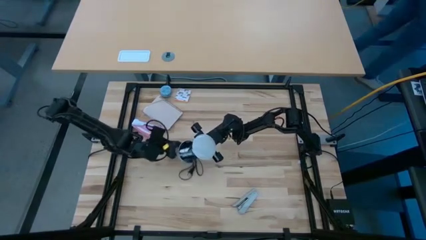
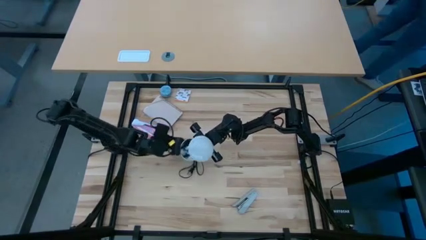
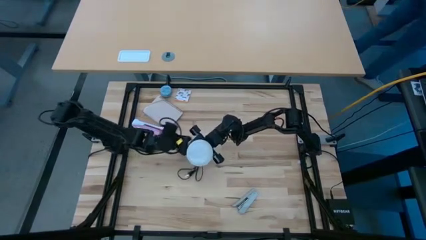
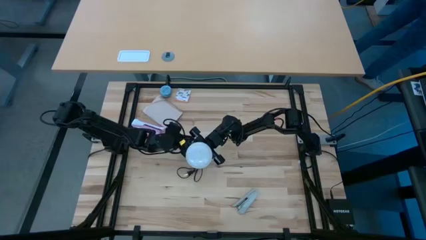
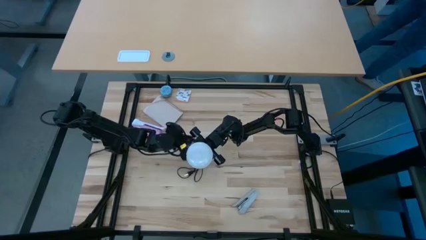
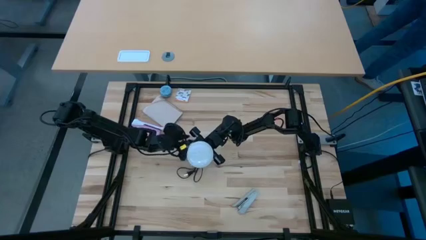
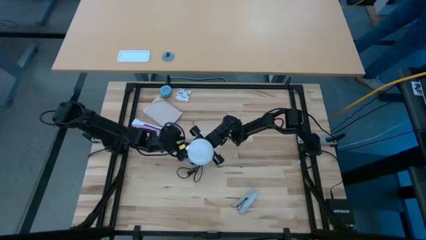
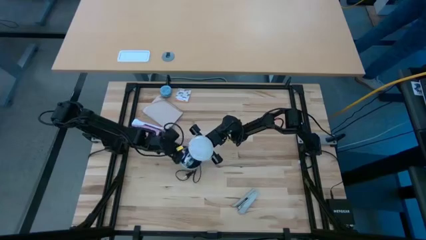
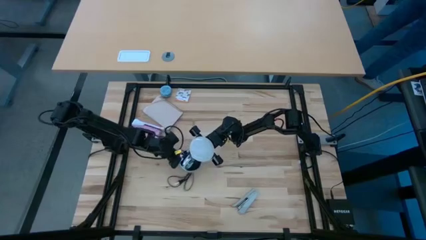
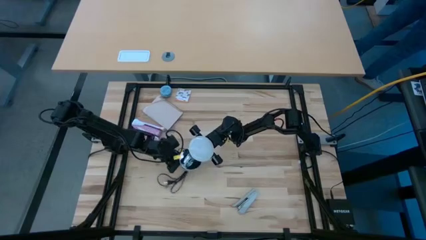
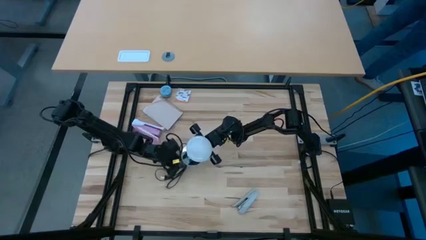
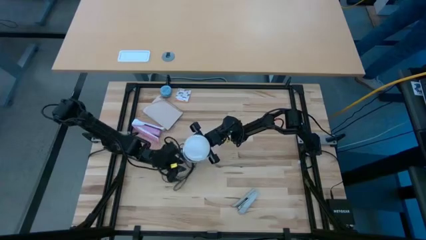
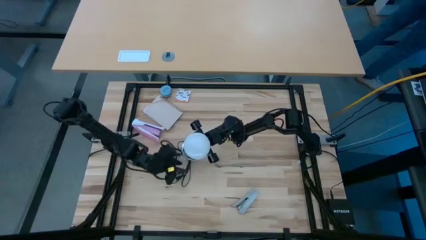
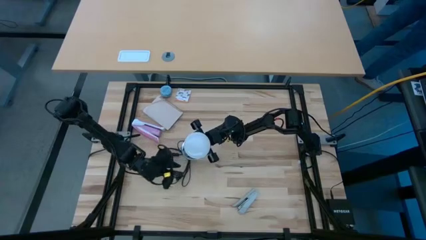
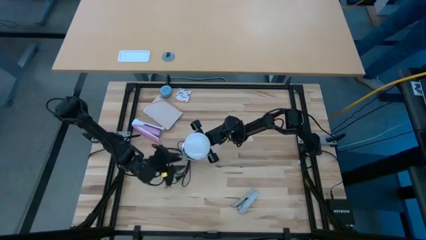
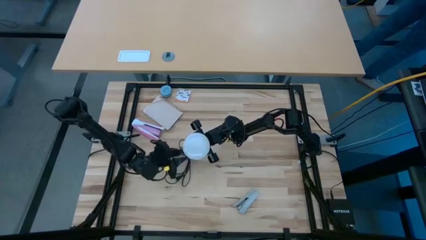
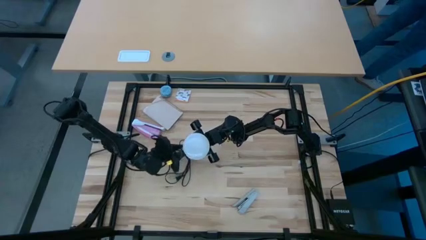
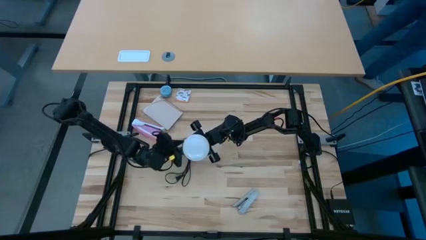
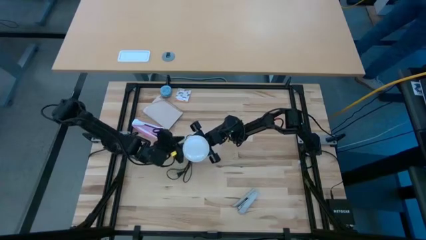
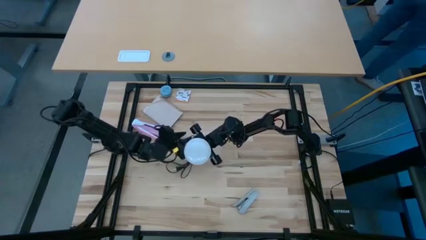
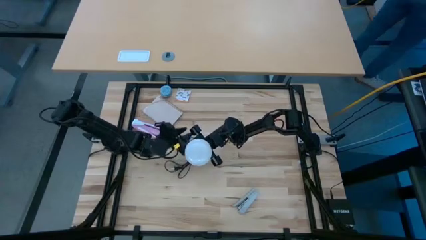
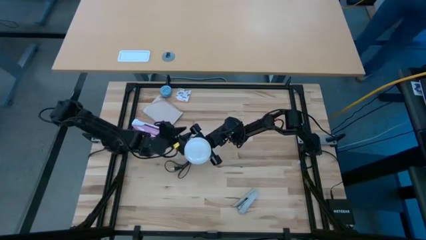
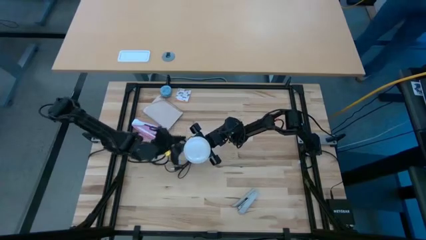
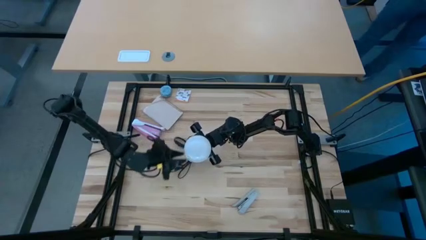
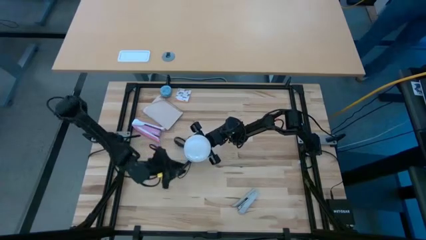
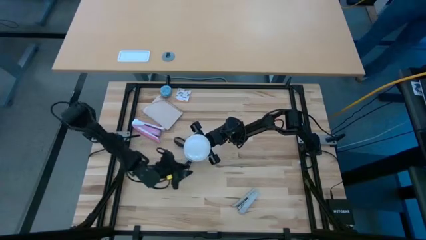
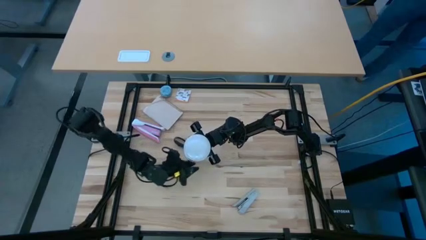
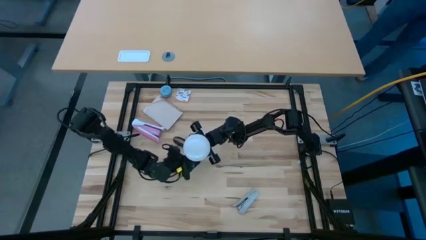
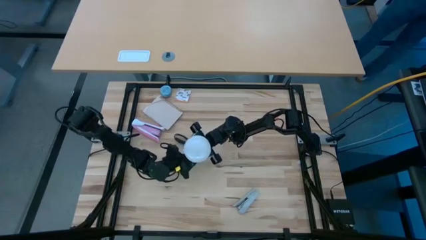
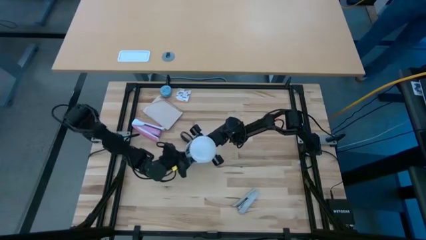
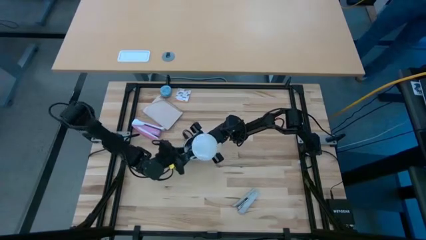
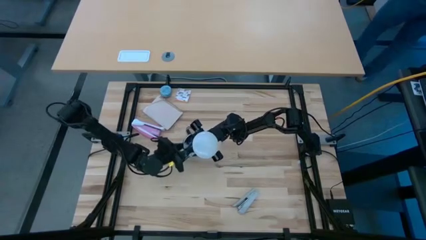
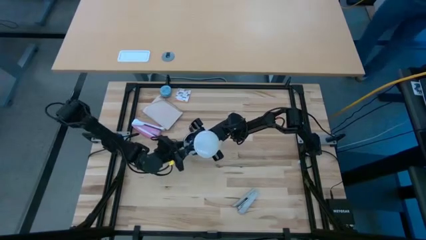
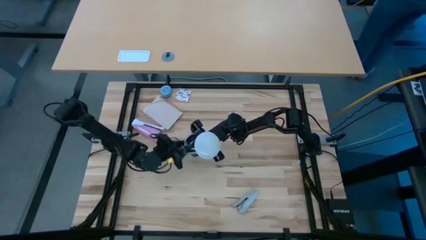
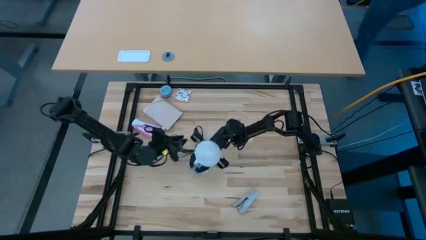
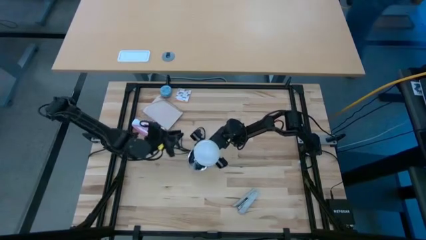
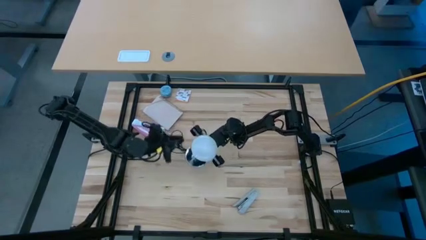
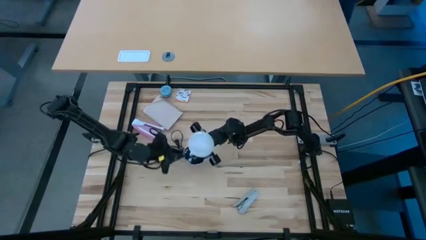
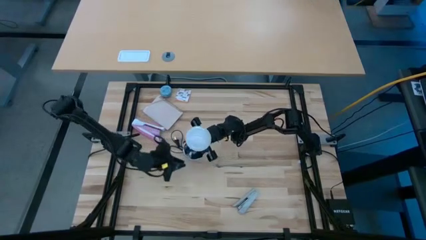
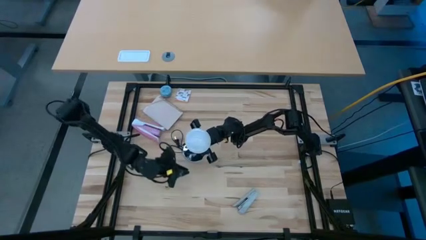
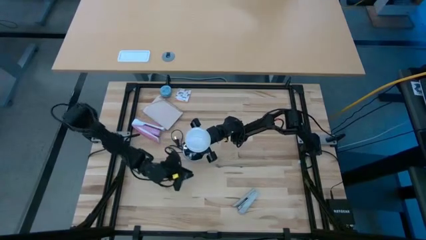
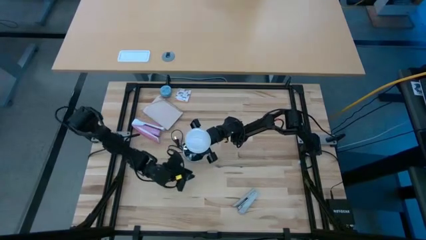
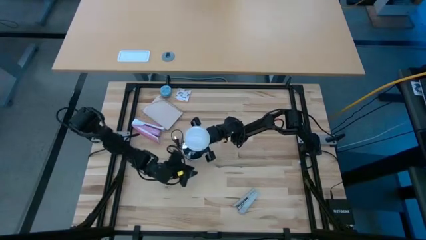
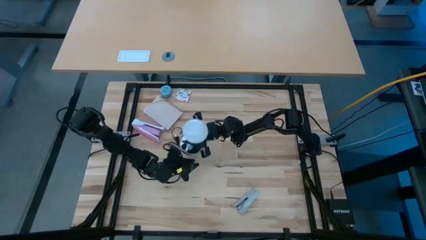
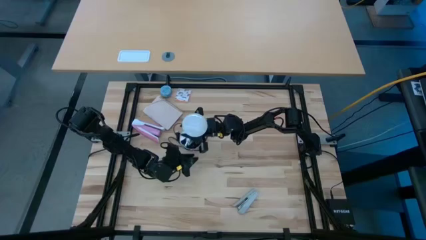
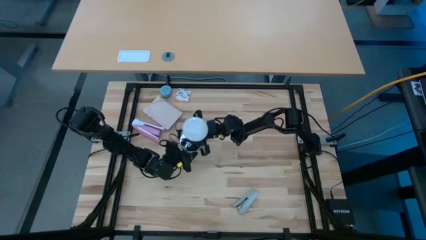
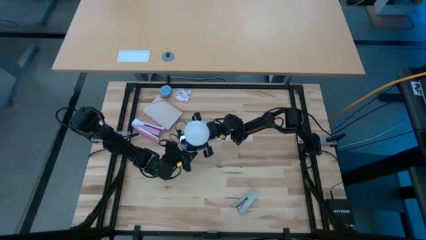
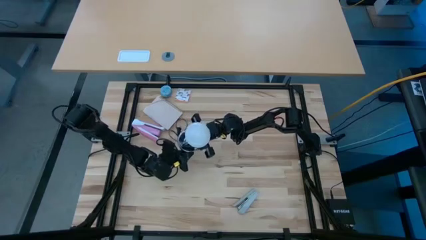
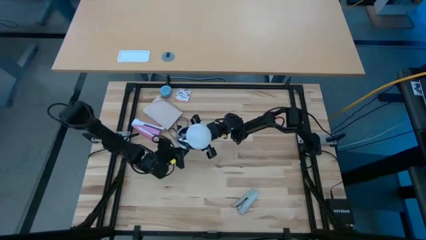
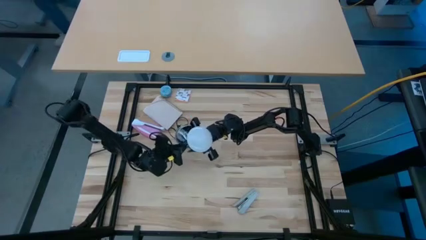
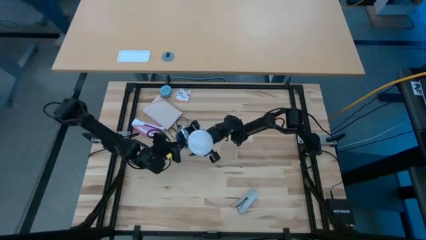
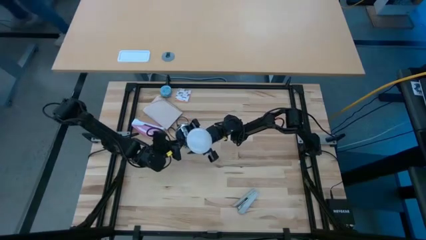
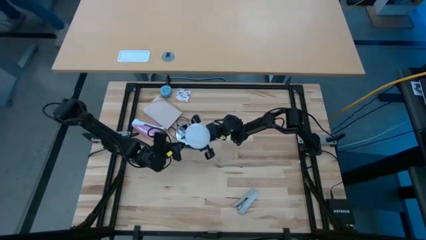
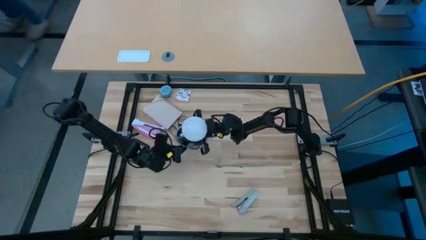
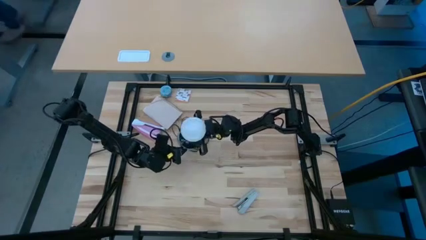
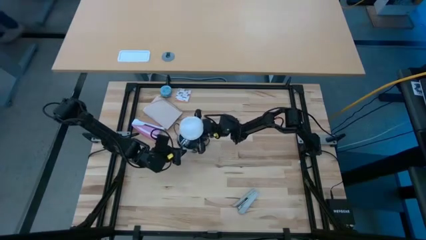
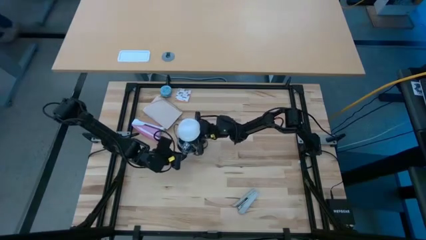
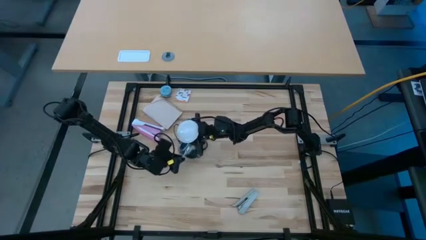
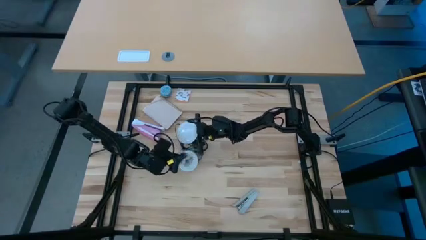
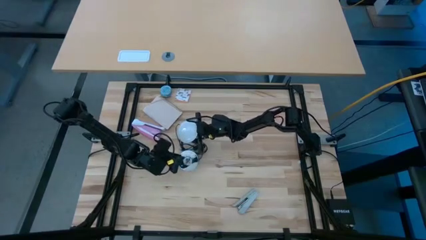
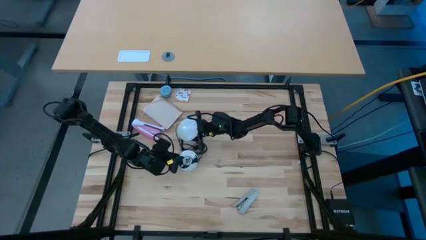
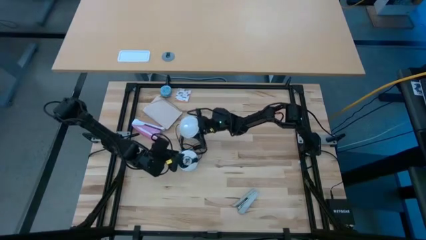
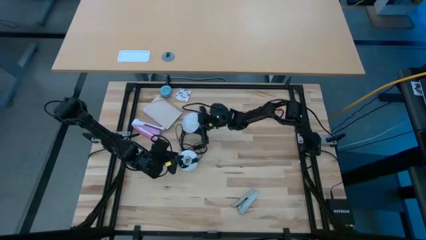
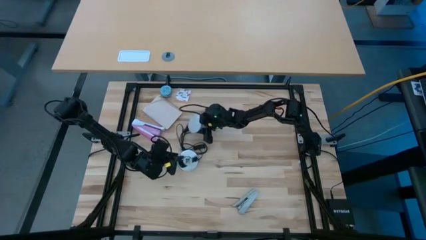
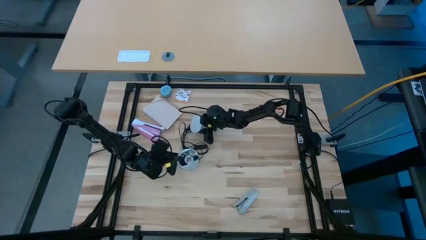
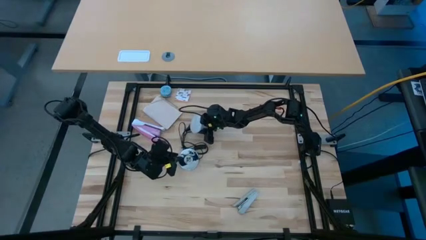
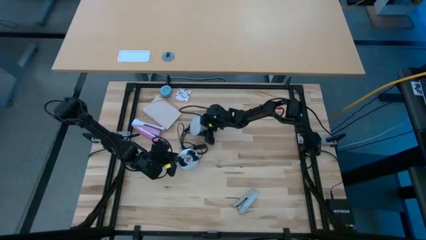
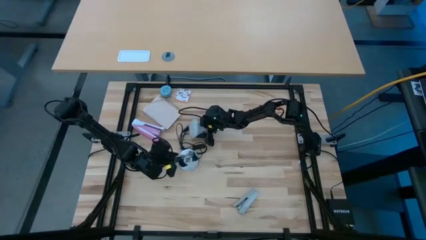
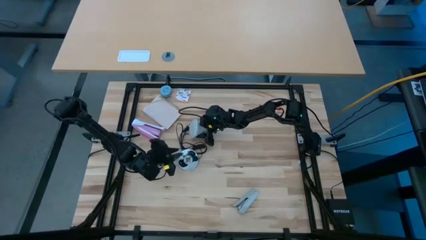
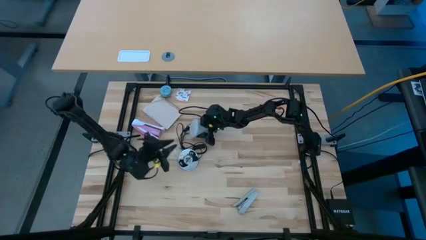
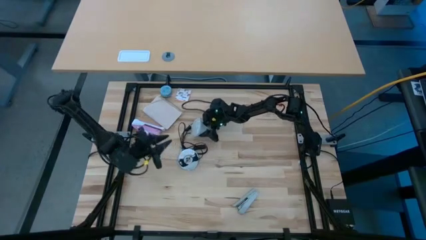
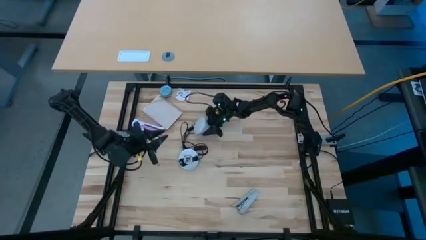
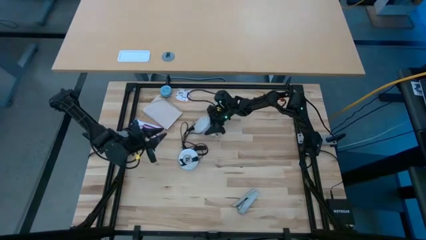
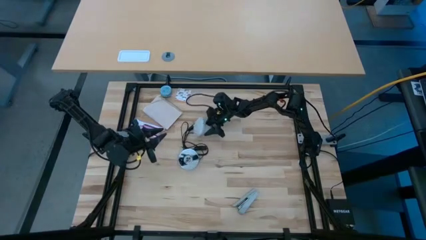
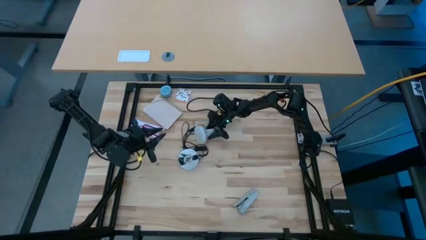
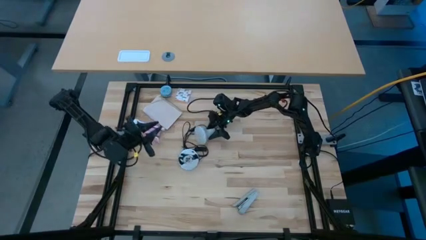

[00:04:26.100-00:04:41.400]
Task: Screw lightbulb
Remove the lightbulb from the lamp
